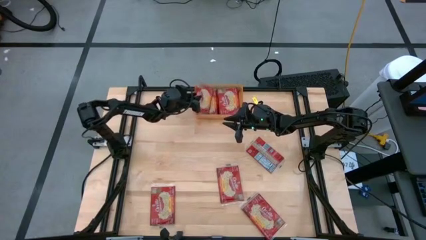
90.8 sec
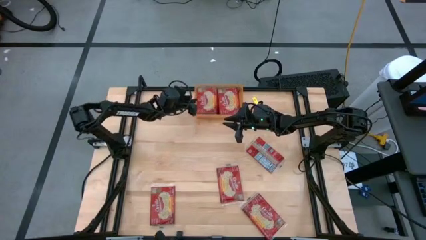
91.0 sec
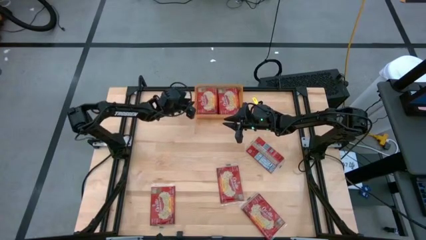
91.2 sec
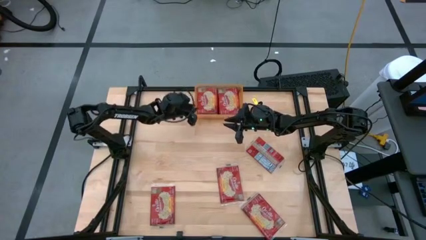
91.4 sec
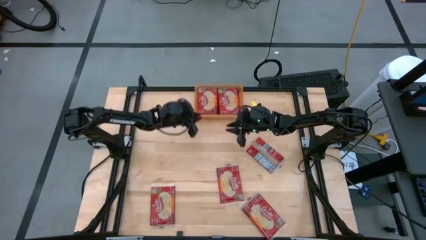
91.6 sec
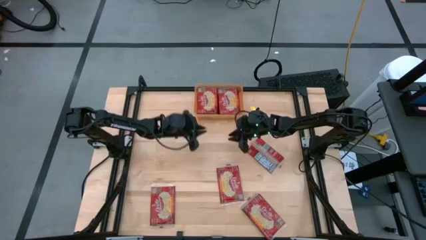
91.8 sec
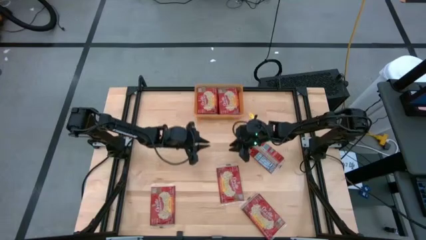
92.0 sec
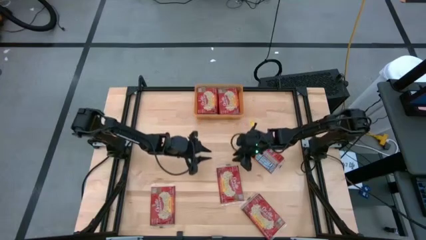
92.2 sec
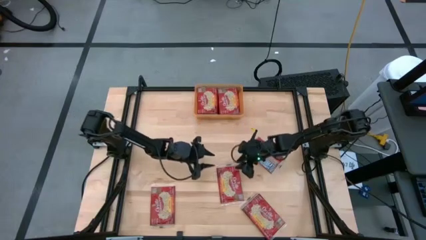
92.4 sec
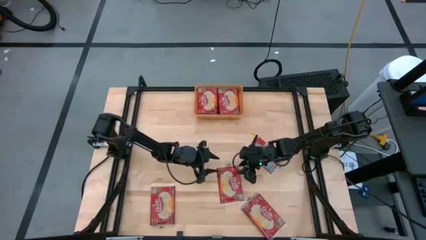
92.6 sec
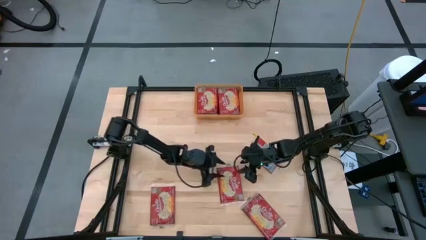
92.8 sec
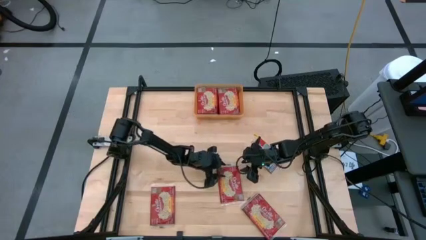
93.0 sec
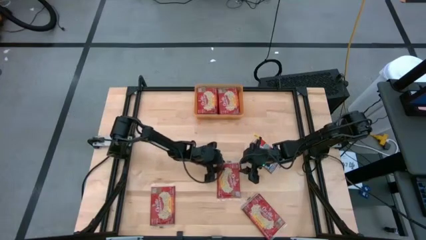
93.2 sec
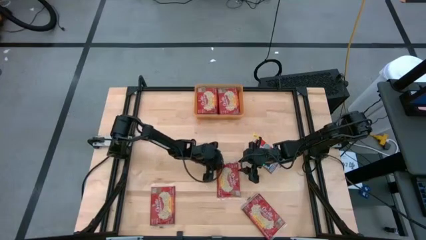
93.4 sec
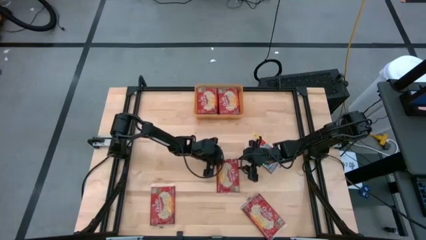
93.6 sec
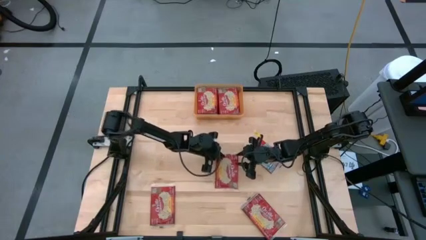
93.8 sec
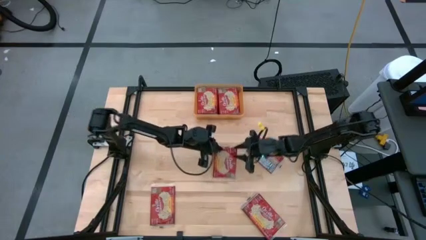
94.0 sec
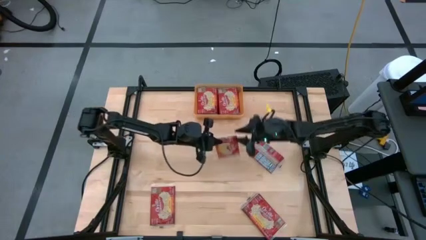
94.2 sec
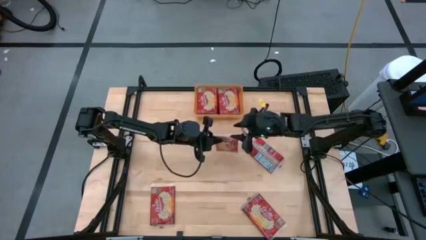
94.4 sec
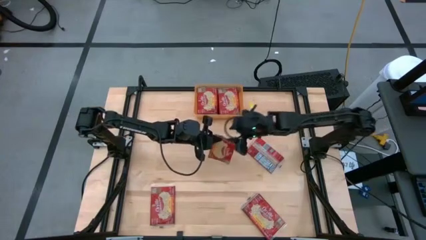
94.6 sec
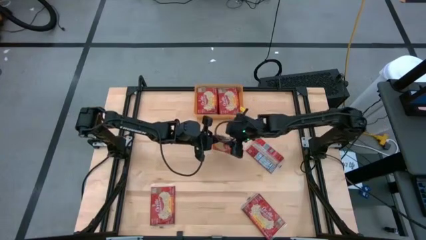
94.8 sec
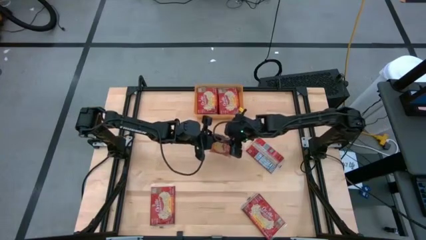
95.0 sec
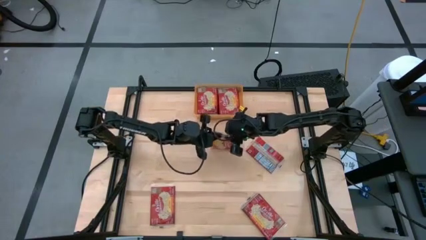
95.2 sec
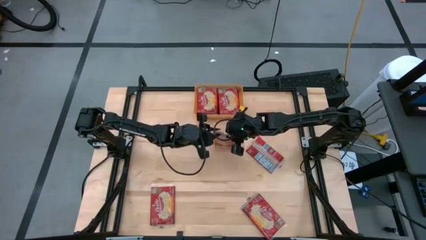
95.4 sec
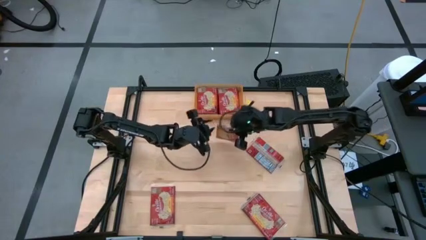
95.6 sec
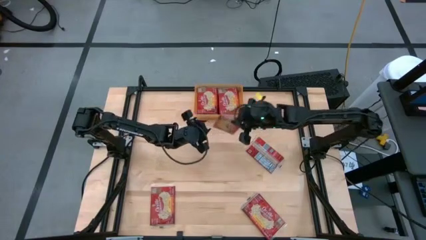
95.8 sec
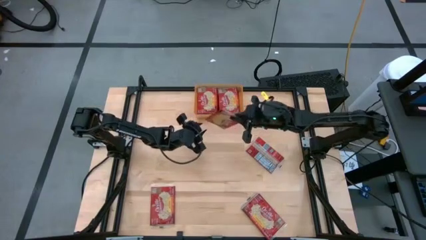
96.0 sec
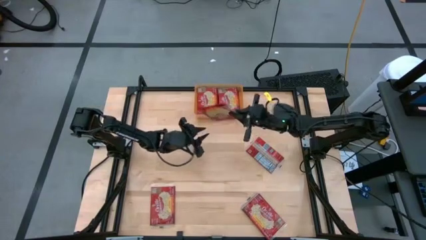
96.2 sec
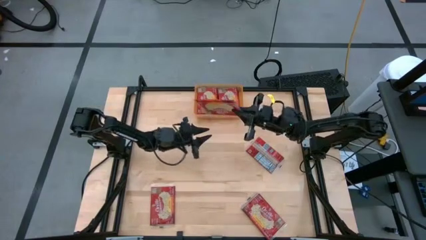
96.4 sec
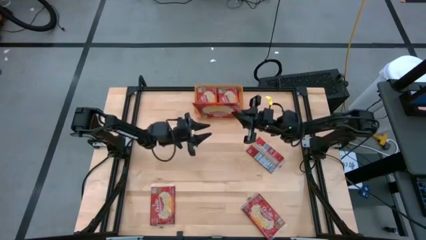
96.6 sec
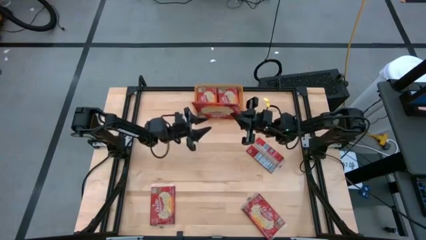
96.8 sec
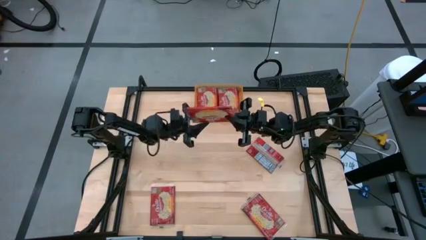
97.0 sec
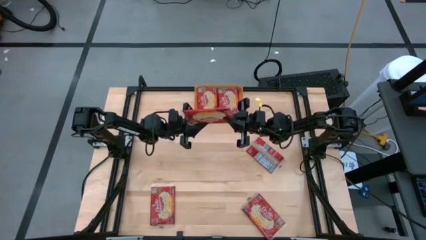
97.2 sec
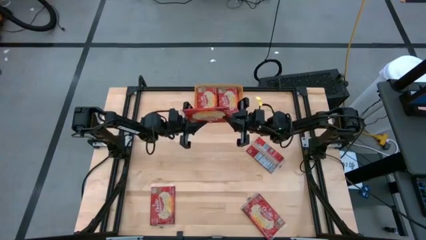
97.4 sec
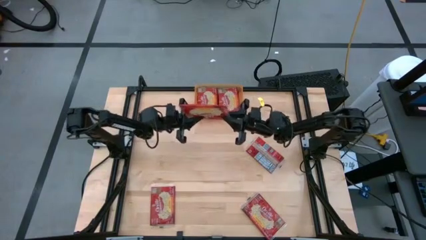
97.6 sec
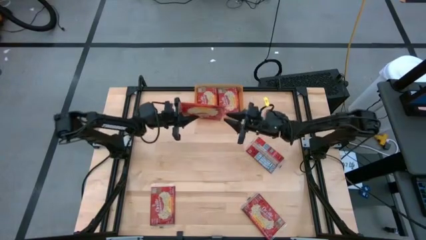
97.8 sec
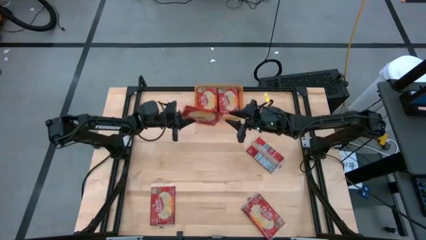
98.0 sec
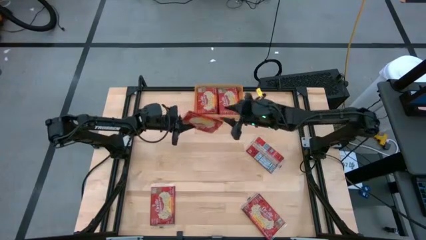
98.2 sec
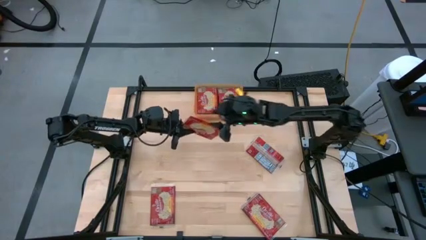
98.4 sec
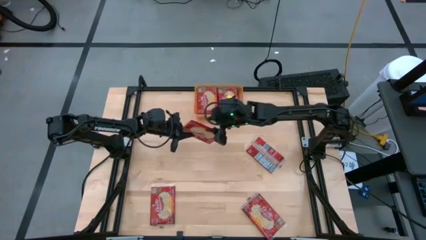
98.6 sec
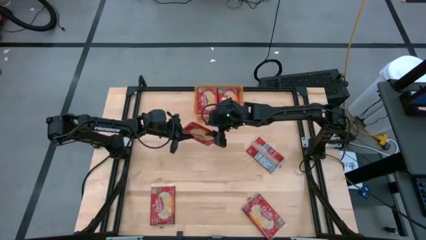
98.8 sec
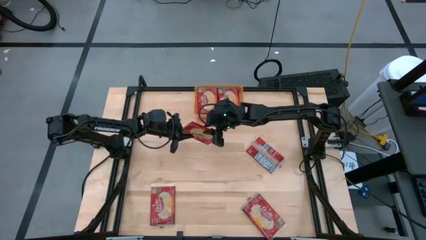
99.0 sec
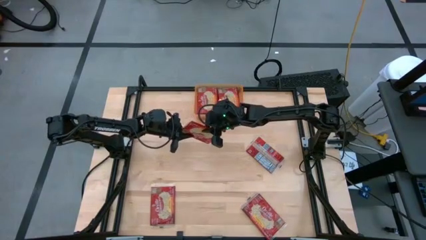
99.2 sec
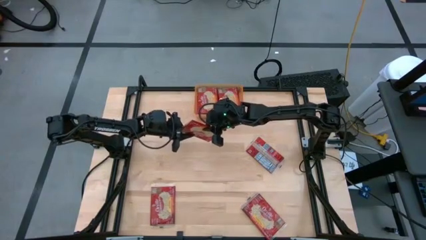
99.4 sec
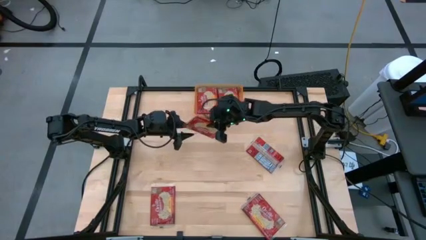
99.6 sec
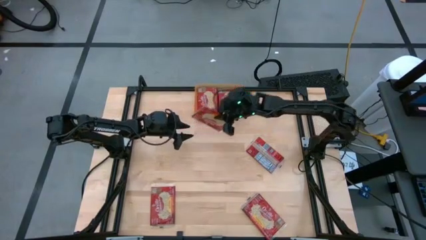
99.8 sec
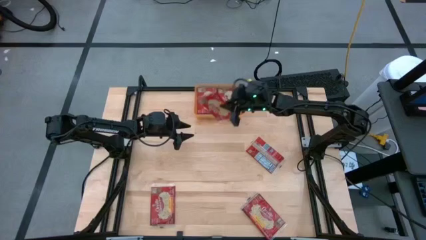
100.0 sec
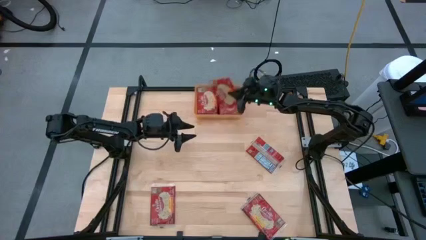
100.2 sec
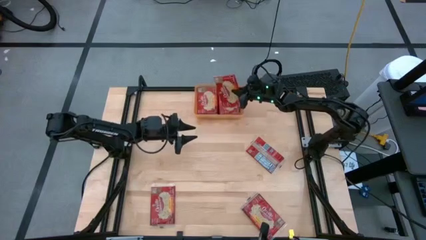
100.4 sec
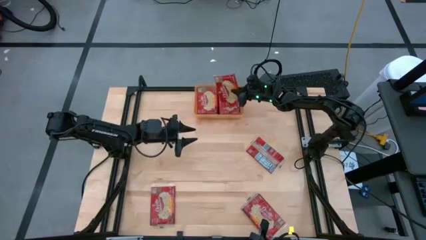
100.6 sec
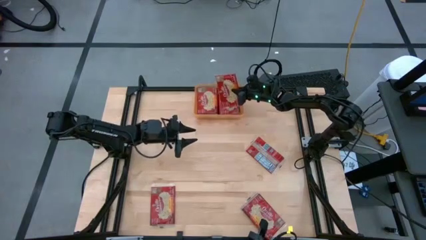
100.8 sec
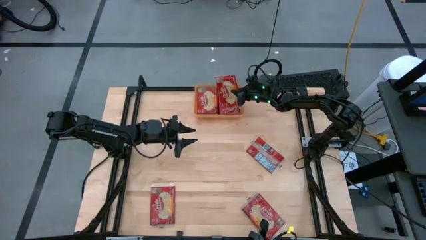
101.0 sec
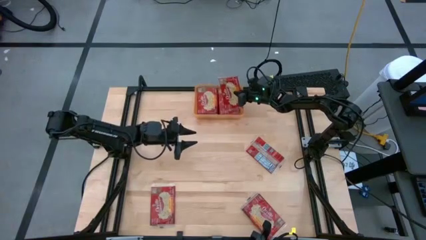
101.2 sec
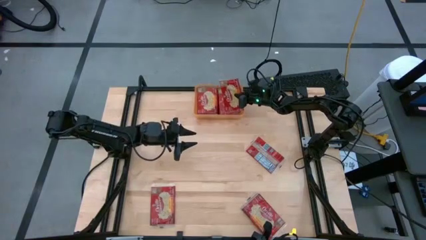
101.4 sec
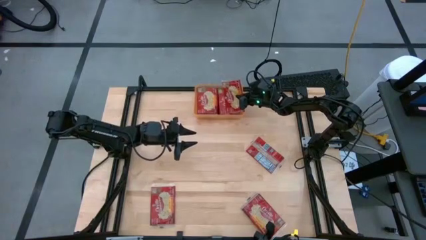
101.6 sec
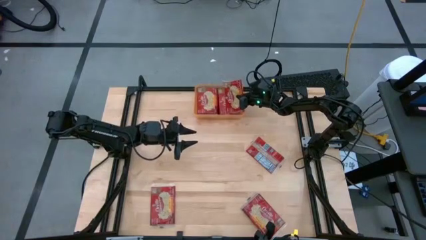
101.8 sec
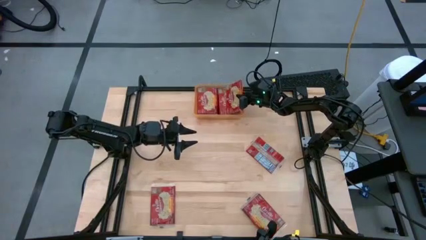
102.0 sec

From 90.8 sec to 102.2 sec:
Task: Sort popcorn bags into baskets
Put the popcorn pack into the orange bin

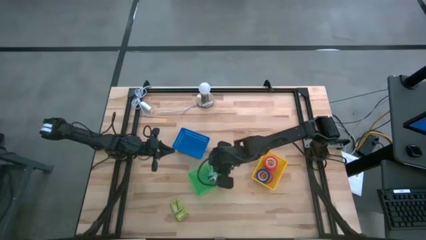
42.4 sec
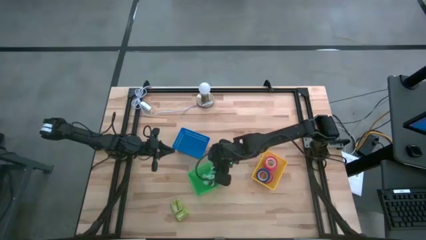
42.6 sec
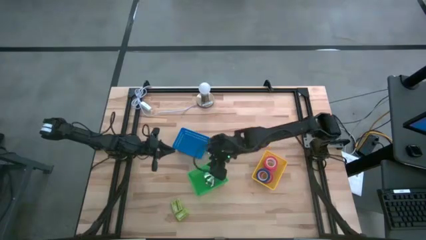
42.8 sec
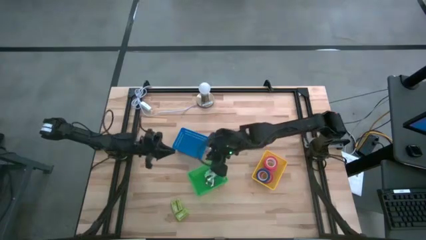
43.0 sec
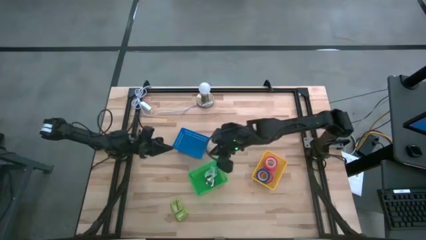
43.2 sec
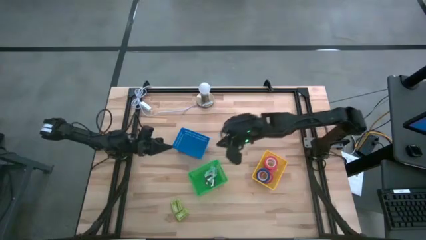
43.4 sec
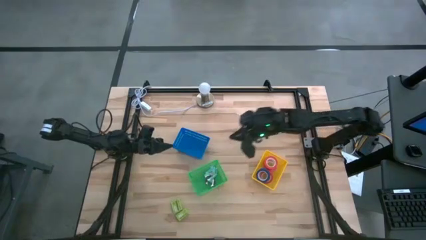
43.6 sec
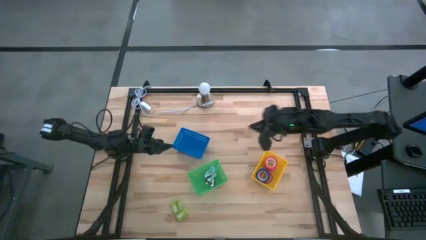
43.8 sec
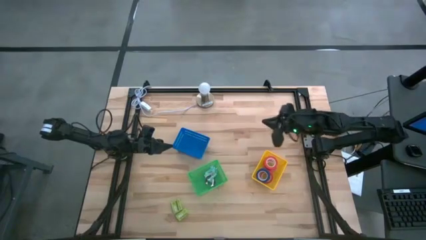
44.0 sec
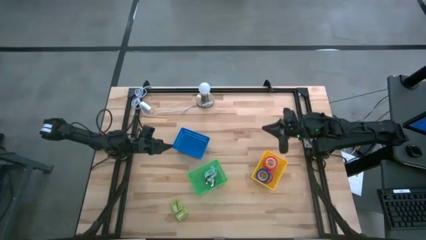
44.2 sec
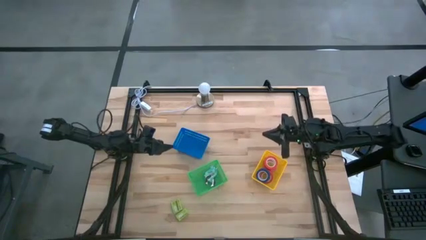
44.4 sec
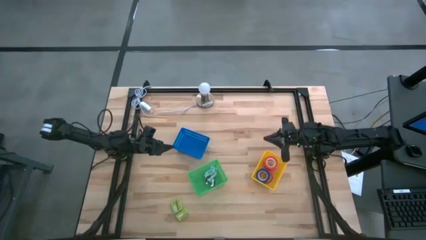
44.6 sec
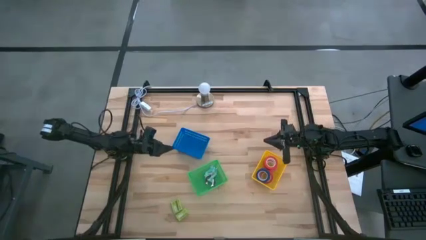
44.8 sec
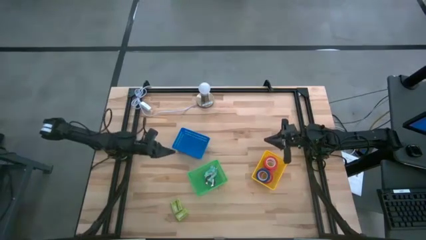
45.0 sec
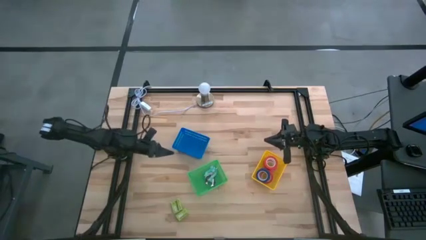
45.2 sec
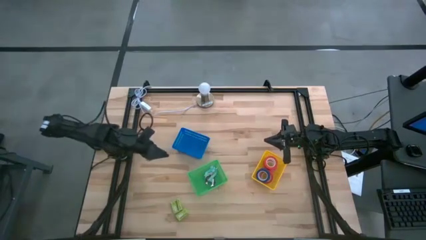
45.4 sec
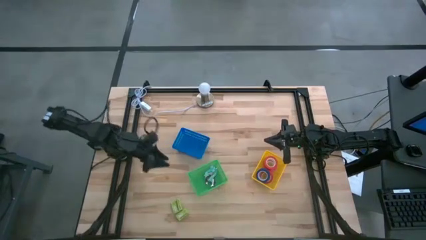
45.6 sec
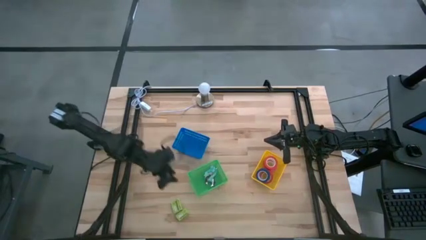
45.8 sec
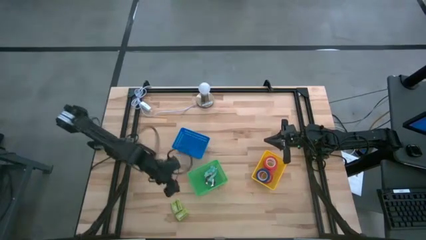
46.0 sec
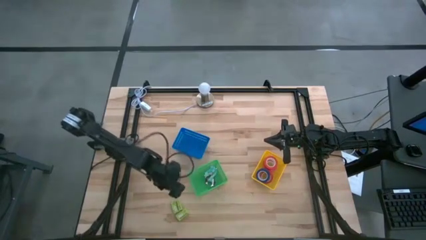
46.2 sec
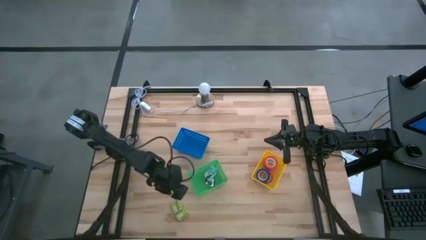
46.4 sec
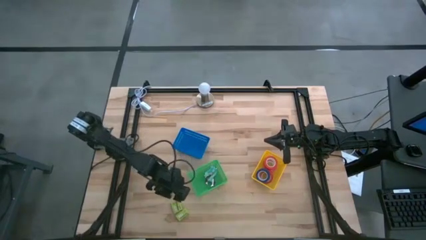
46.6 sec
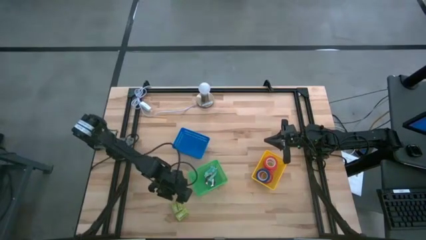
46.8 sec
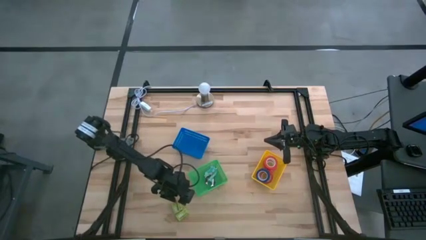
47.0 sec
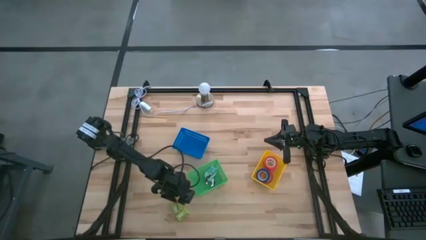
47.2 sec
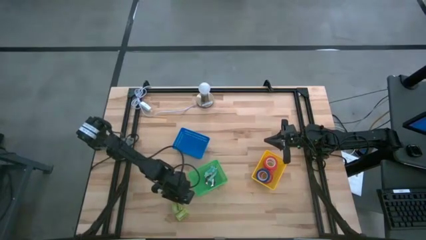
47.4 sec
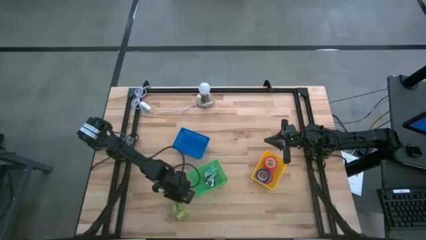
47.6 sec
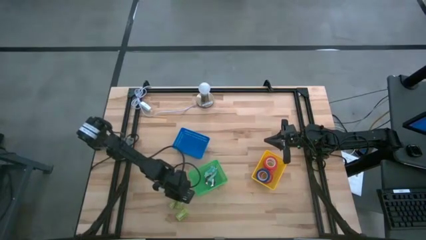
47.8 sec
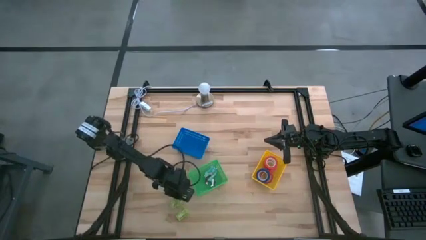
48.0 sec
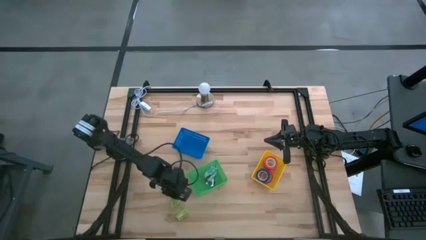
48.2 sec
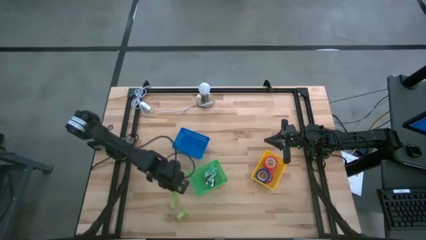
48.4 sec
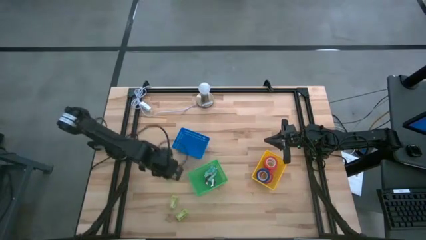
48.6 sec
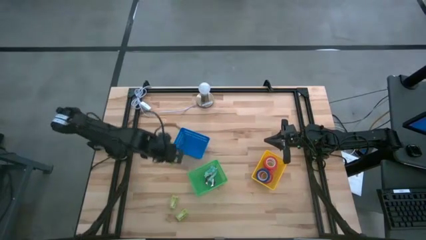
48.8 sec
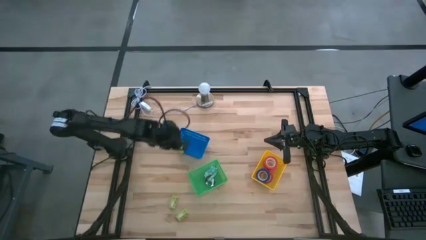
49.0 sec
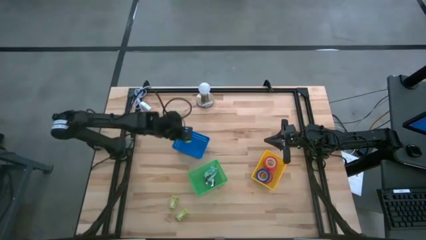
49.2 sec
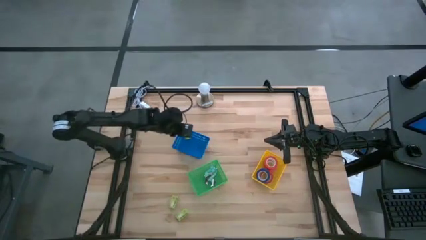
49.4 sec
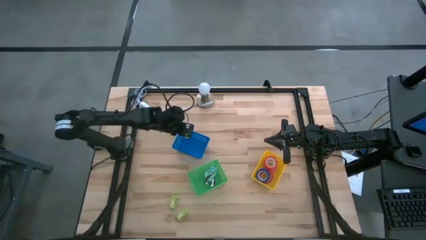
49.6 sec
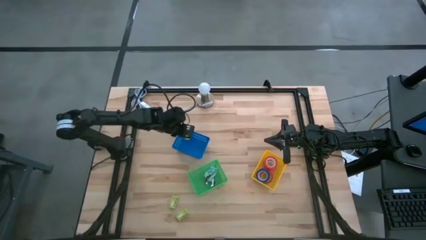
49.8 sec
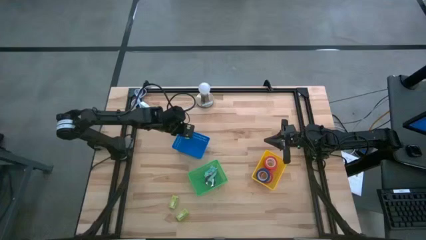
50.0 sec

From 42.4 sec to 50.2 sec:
Task: Pick and place Stapler, Stapler remover, tape
Put the green staple box into the blue bin
